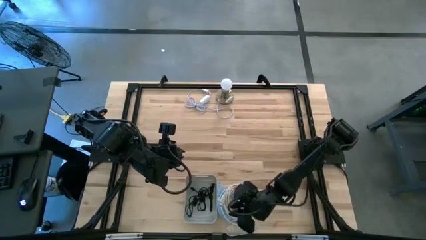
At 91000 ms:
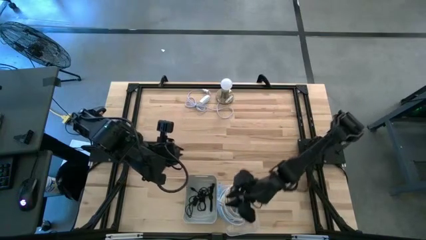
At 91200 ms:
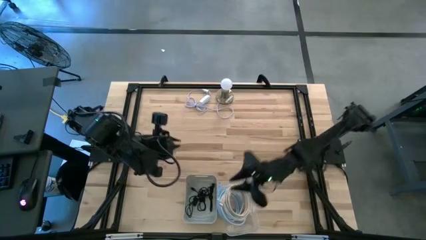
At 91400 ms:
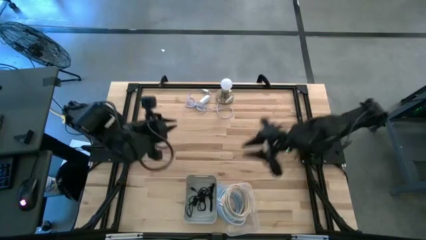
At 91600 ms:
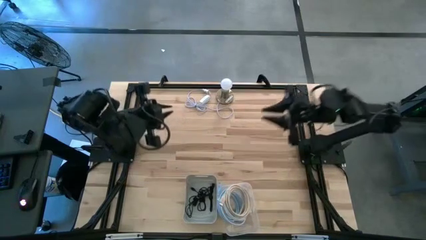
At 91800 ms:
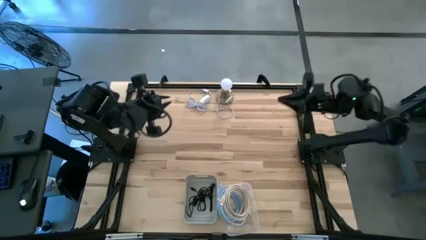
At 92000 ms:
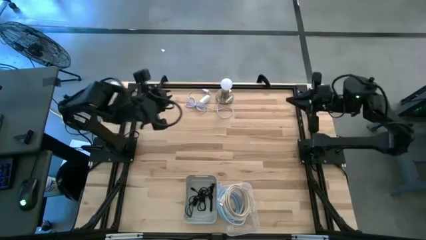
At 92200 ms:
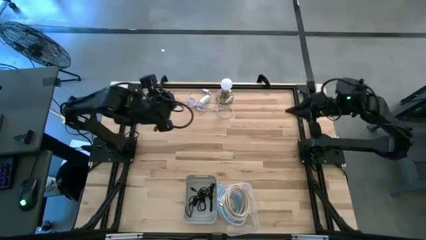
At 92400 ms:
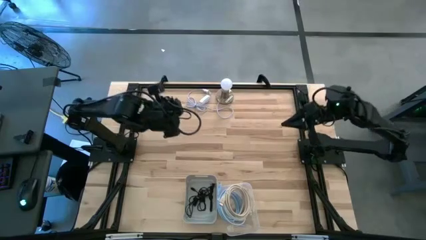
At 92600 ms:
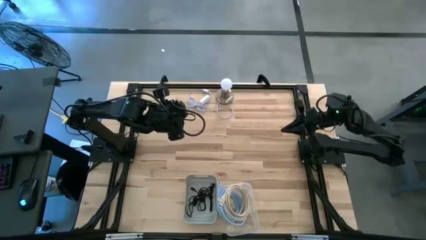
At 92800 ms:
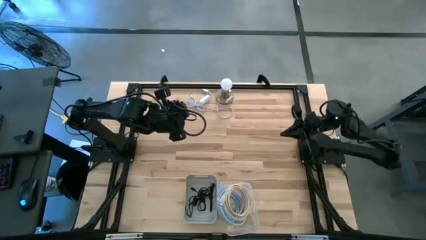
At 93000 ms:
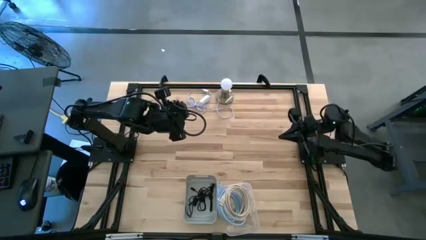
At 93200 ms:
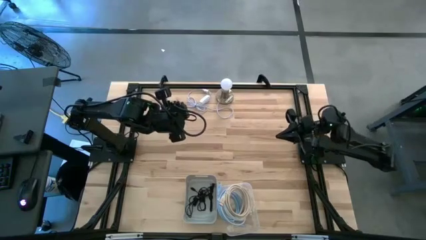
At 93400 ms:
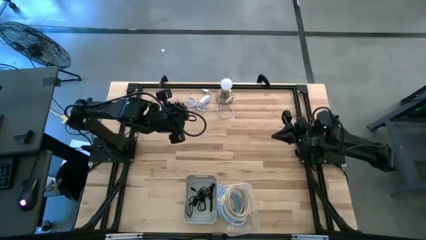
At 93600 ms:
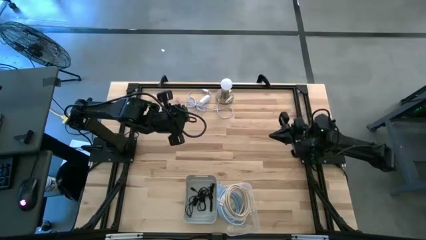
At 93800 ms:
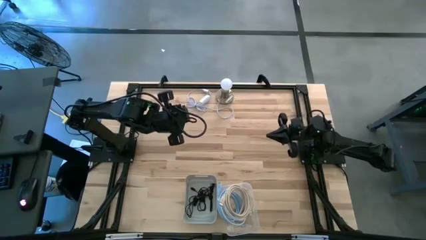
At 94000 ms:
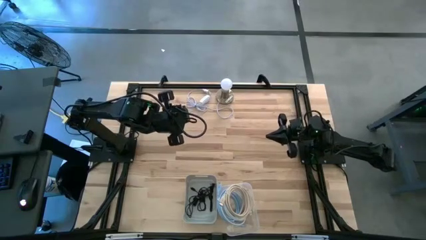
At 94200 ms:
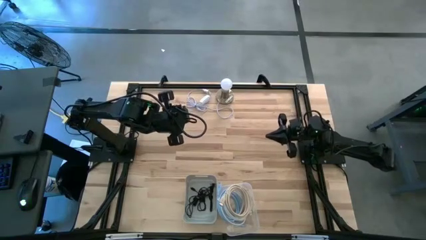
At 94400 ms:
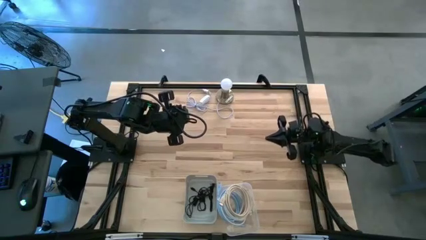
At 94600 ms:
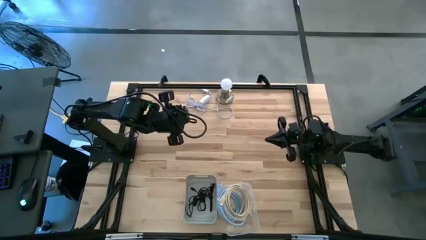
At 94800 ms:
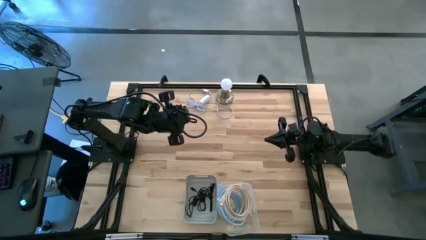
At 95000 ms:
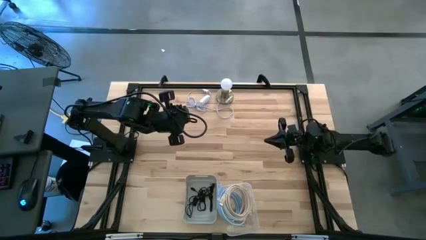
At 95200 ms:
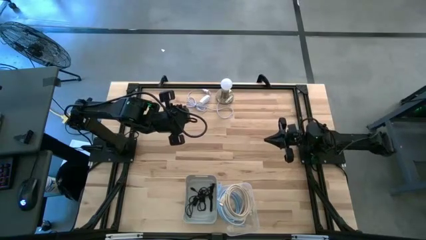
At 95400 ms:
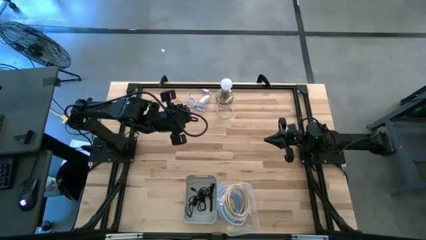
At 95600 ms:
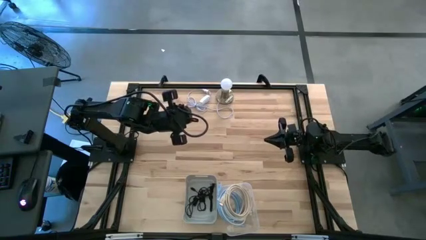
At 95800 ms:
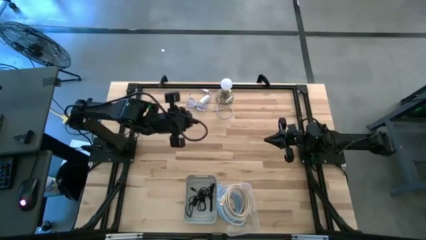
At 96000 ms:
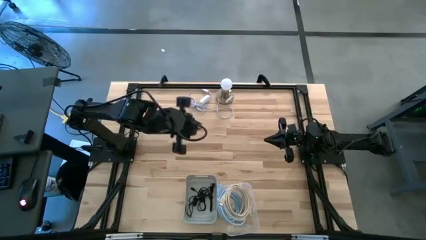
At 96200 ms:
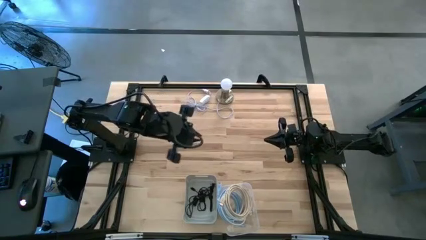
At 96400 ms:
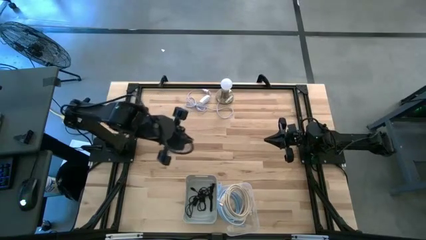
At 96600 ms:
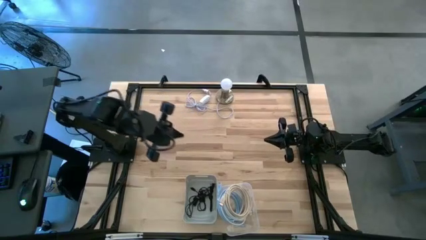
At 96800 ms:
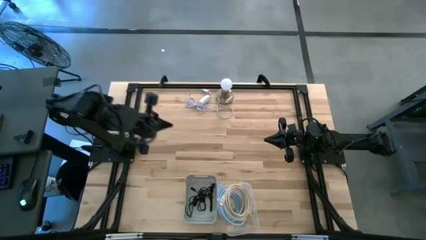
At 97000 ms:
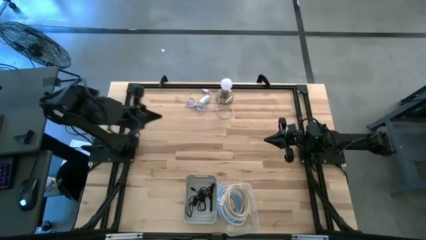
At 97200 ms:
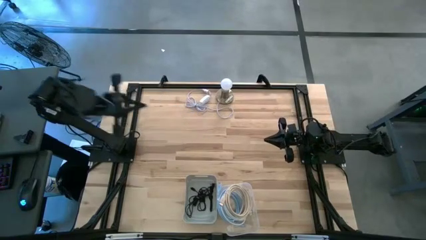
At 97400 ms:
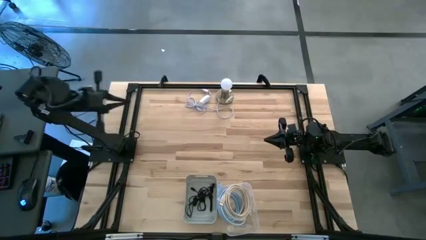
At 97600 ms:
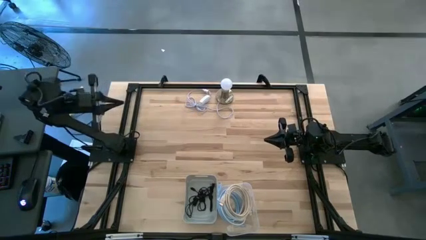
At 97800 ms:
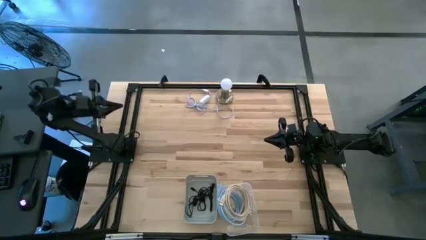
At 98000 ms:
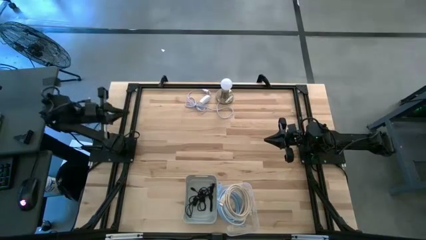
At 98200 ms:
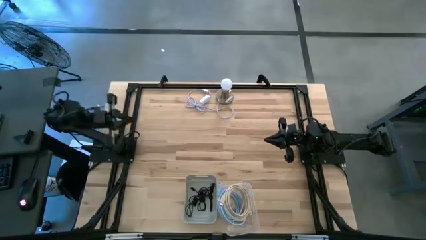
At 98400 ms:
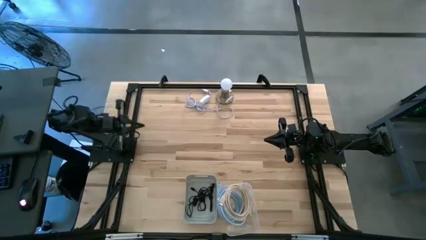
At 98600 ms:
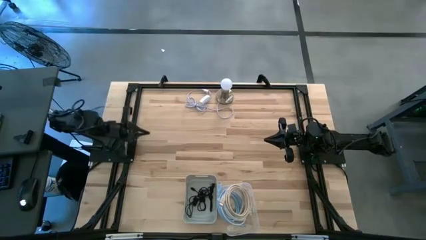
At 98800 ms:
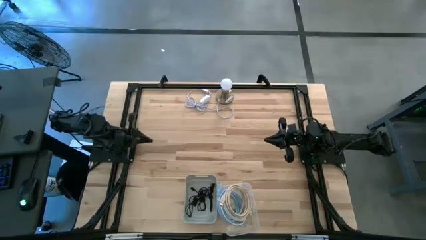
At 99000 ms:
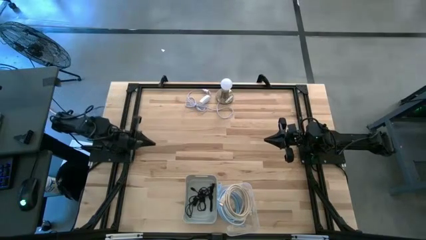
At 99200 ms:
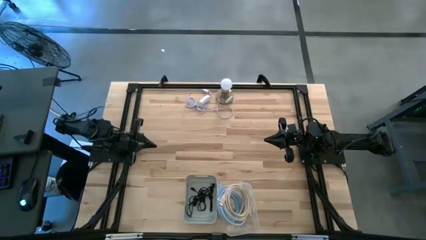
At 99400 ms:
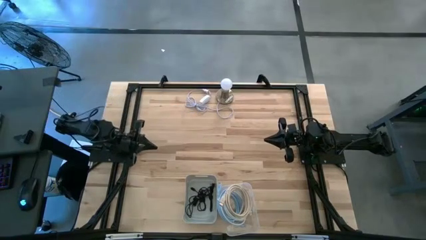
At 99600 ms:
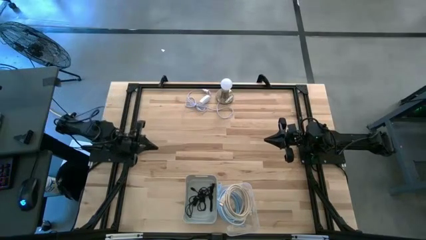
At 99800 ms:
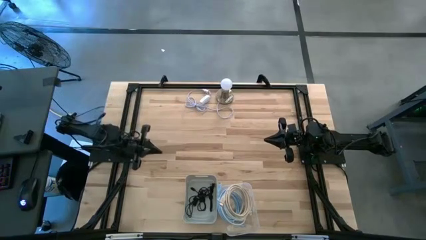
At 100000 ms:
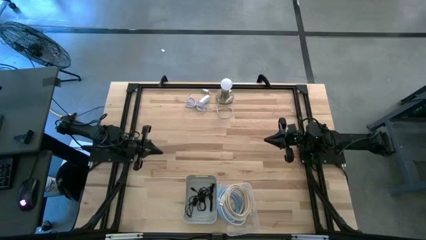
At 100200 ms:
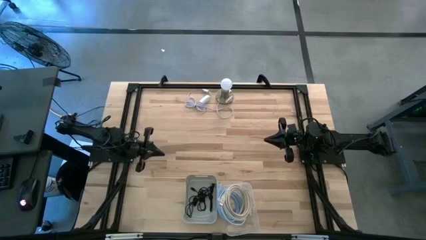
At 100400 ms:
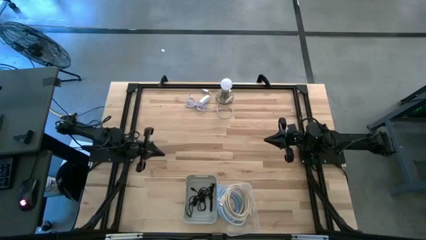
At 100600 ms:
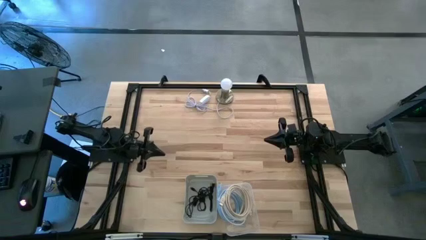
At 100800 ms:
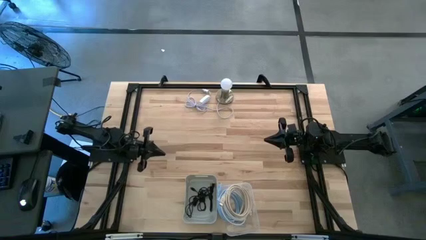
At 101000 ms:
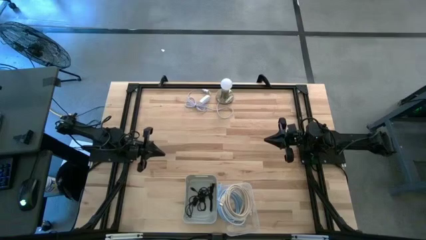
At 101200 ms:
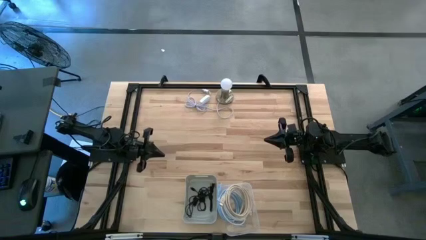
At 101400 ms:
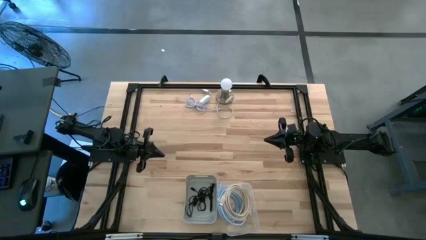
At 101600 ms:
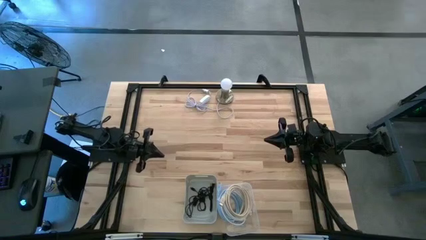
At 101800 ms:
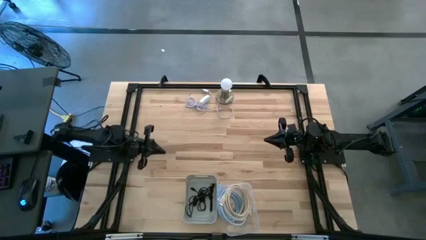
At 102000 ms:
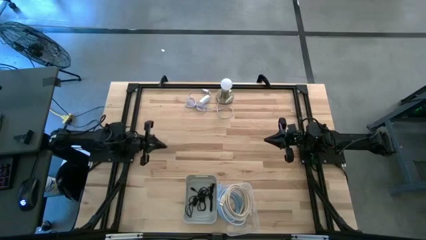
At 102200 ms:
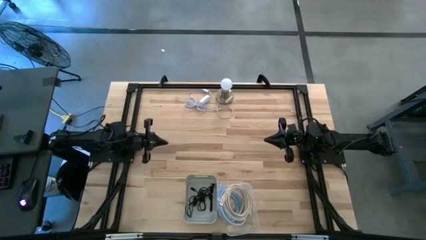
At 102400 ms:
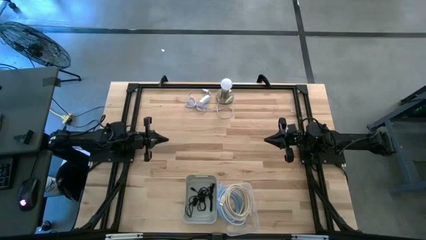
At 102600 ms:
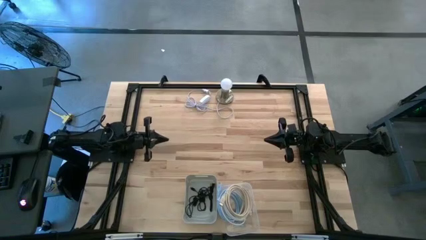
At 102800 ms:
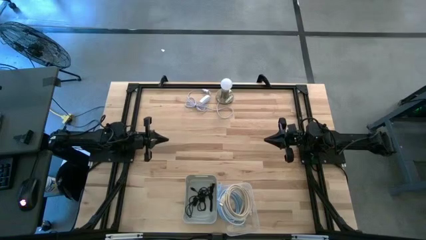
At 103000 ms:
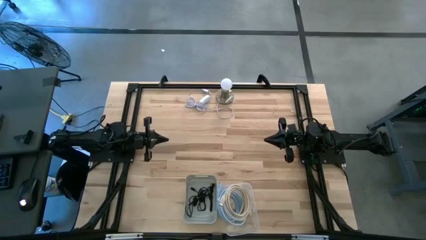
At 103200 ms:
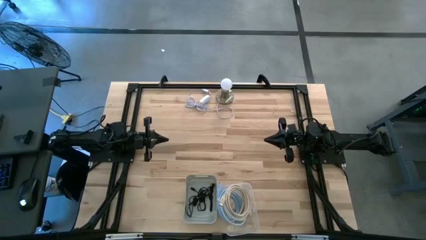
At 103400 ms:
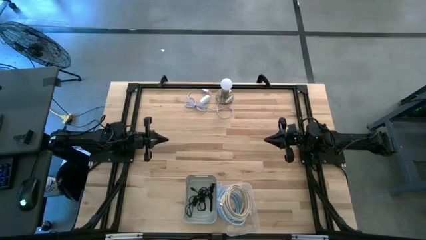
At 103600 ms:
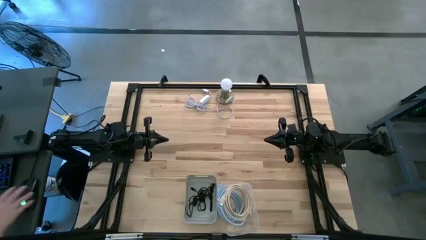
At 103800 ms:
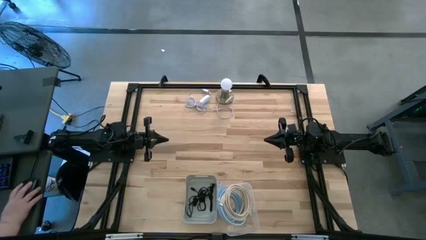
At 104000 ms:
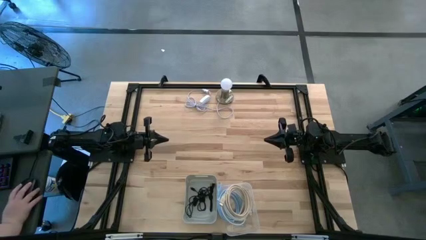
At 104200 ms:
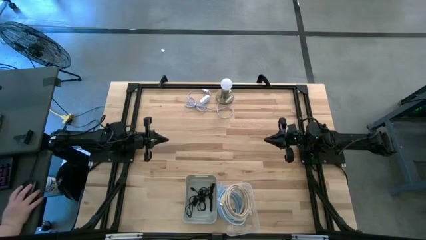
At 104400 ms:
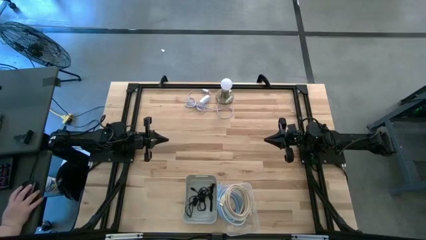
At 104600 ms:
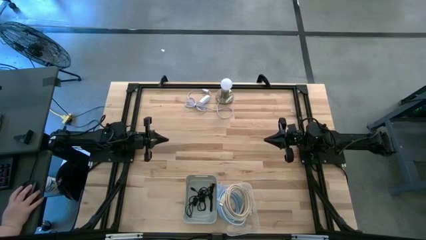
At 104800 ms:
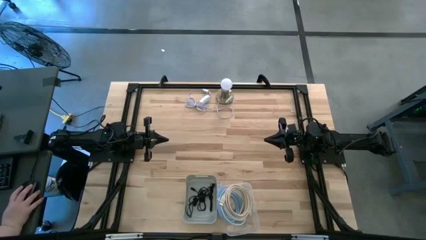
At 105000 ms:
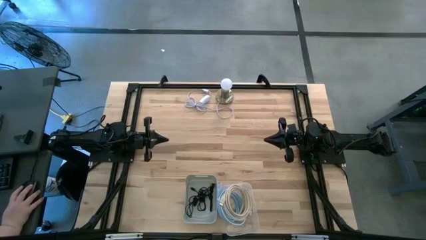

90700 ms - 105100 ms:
Task: Pick & Place USB Port
Return to Home Position

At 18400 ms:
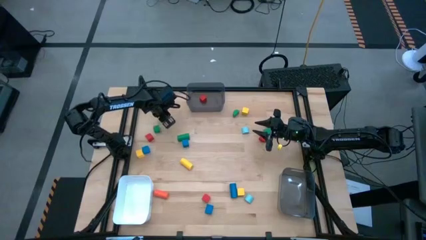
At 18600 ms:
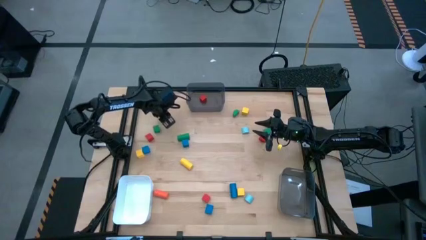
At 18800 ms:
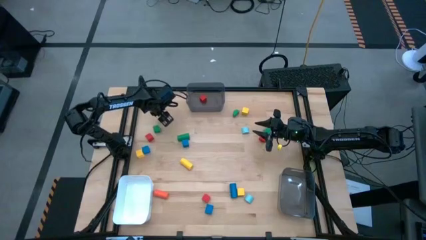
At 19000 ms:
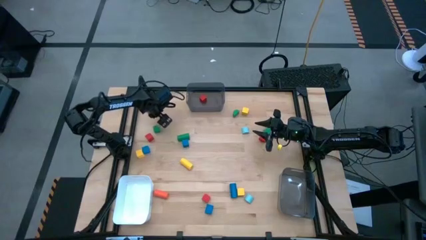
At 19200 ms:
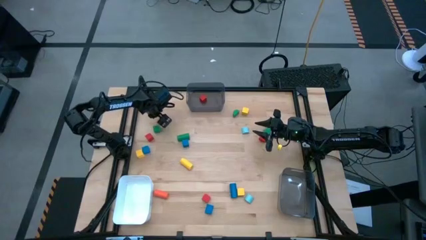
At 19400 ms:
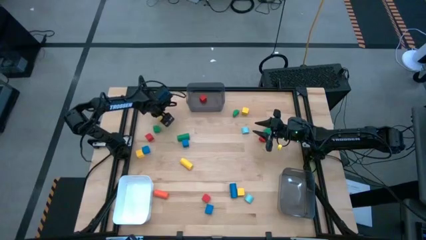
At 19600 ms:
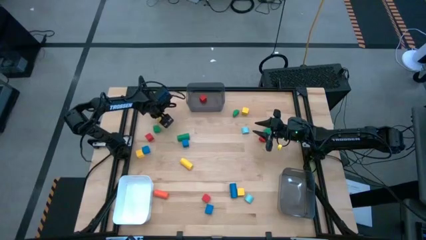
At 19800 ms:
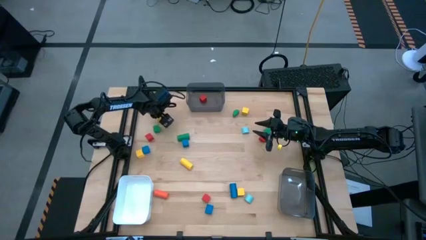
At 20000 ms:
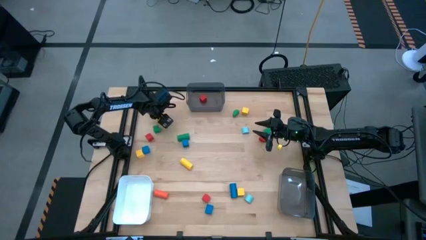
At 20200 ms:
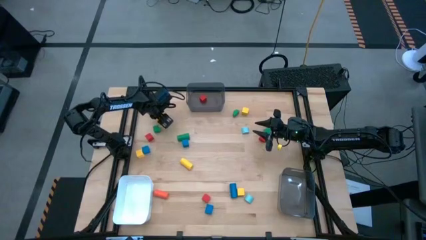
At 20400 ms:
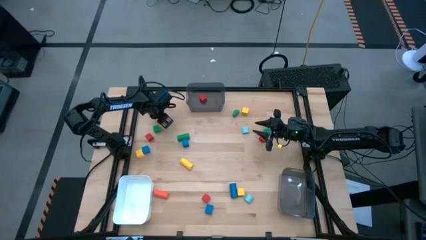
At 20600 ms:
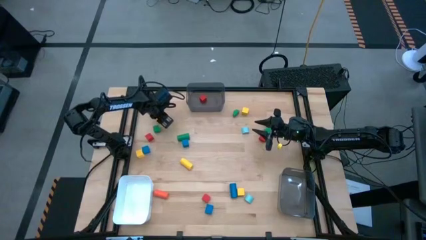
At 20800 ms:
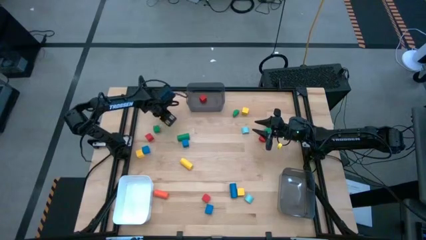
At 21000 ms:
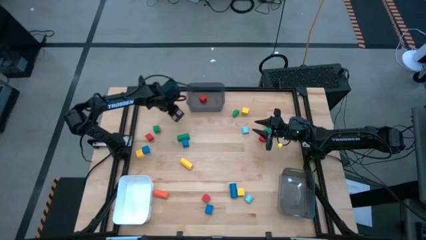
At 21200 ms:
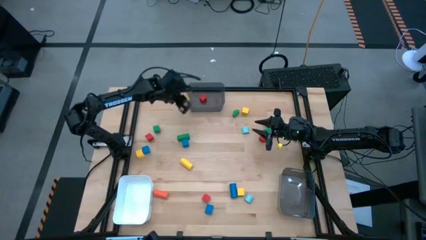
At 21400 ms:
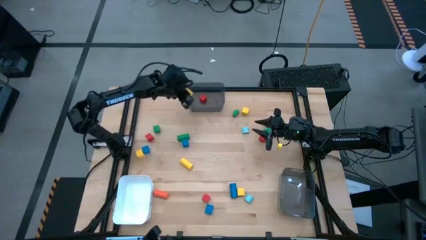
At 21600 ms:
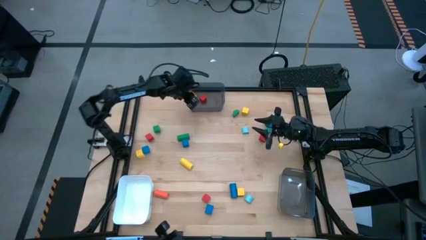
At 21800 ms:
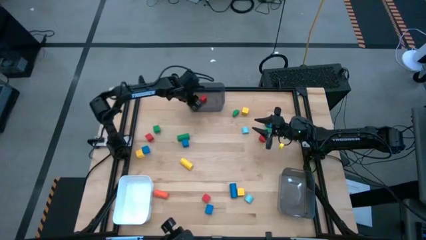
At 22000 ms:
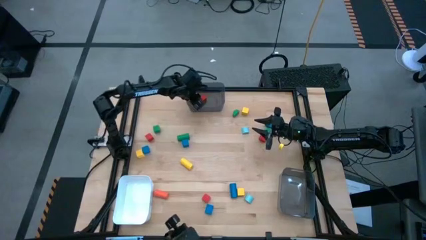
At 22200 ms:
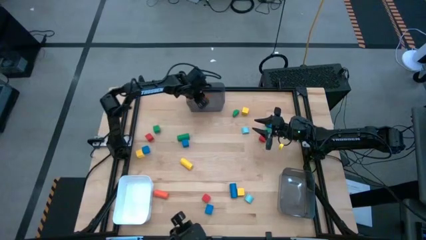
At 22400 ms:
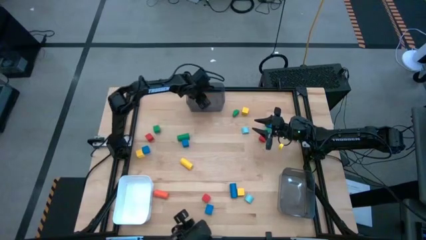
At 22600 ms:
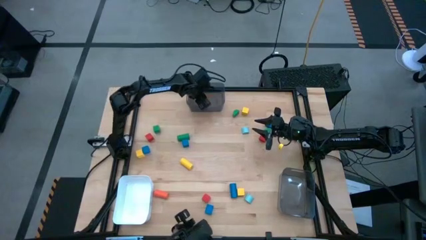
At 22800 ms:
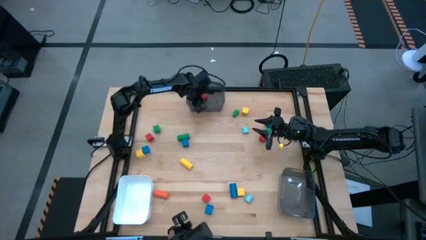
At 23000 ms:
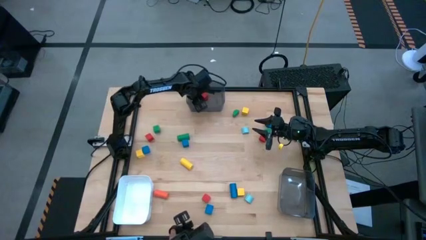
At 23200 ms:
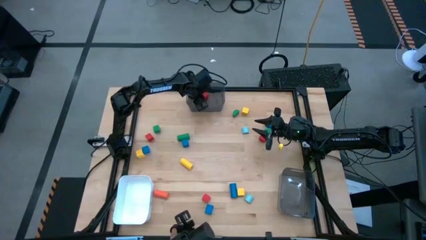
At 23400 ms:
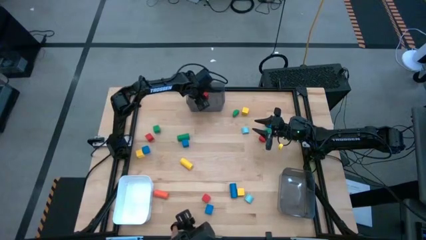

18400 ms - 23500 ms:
Task: Sort blocks by size
Put the yellow square block into the top black bin
